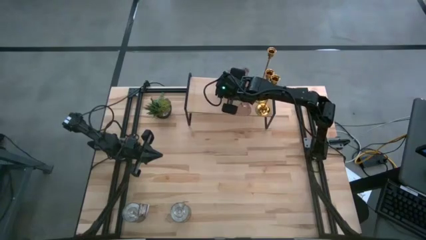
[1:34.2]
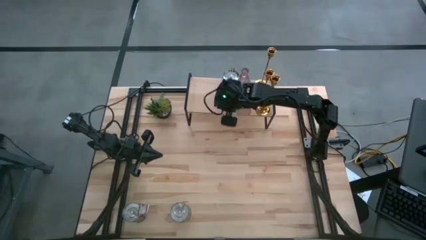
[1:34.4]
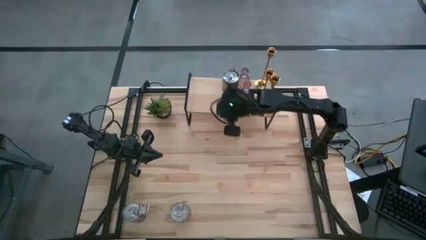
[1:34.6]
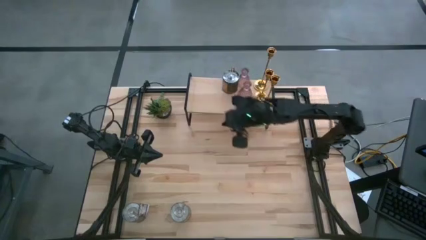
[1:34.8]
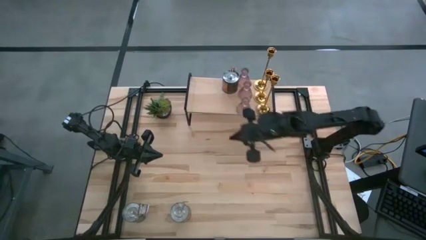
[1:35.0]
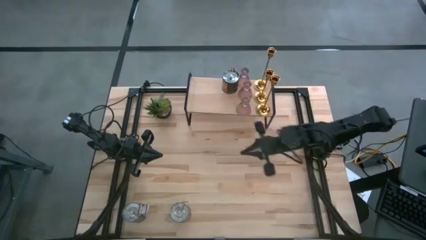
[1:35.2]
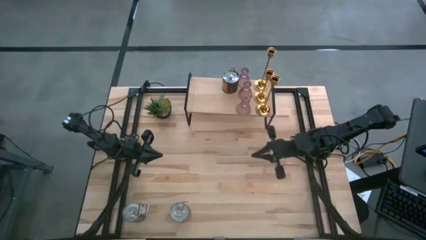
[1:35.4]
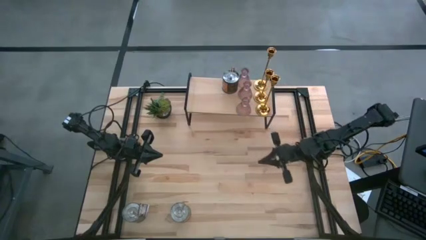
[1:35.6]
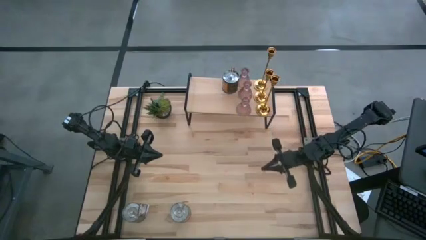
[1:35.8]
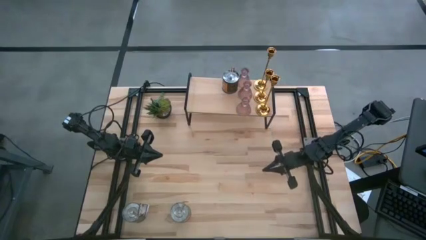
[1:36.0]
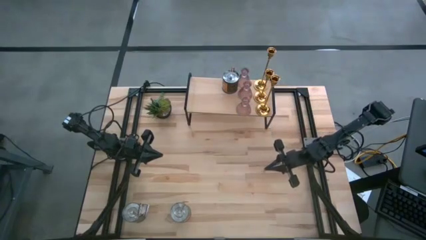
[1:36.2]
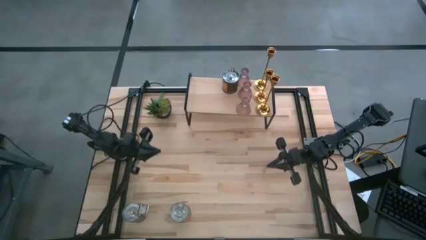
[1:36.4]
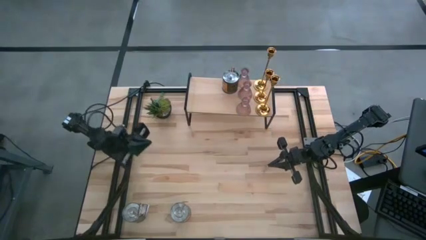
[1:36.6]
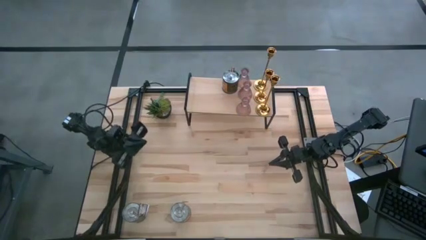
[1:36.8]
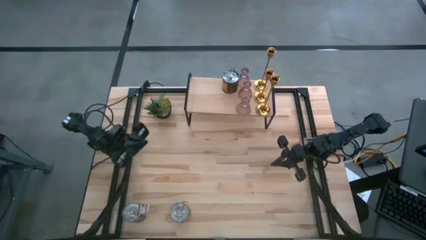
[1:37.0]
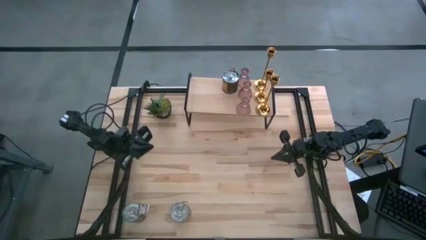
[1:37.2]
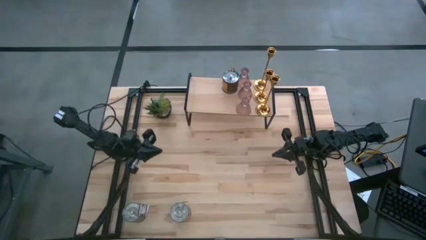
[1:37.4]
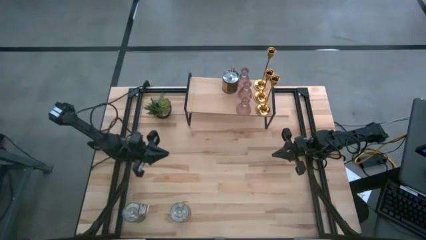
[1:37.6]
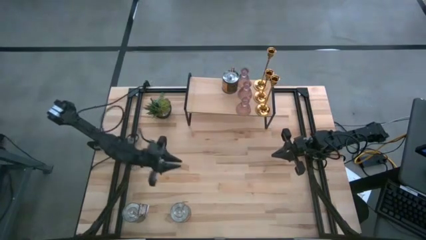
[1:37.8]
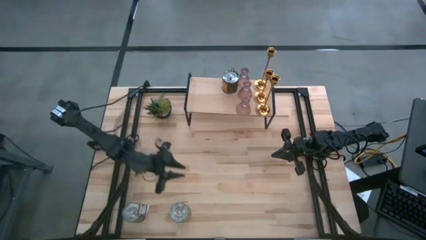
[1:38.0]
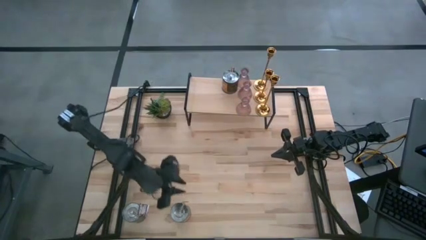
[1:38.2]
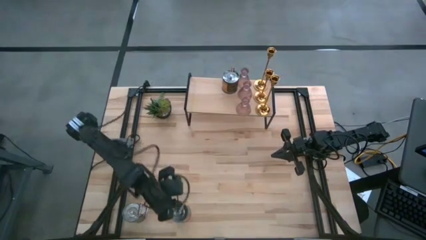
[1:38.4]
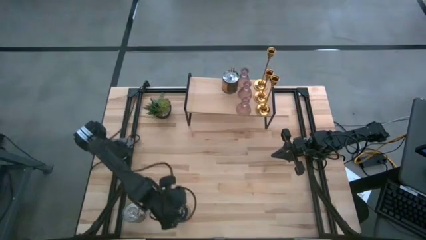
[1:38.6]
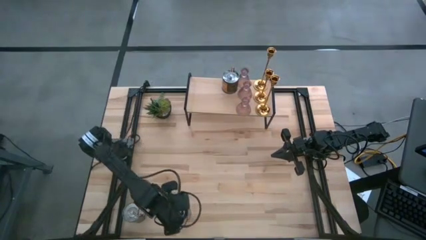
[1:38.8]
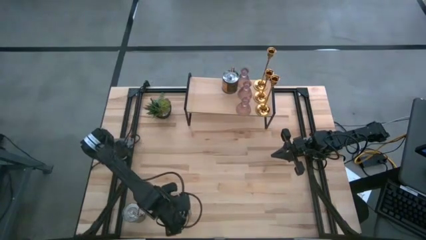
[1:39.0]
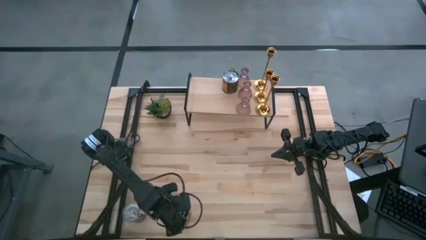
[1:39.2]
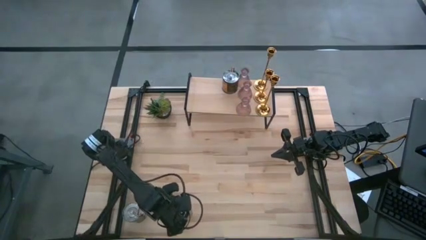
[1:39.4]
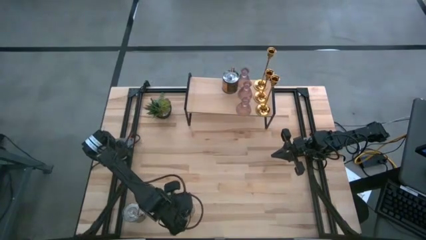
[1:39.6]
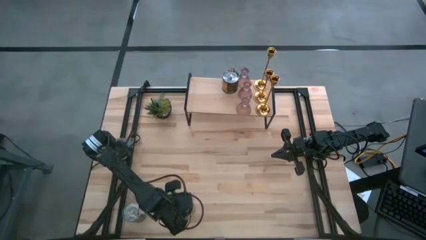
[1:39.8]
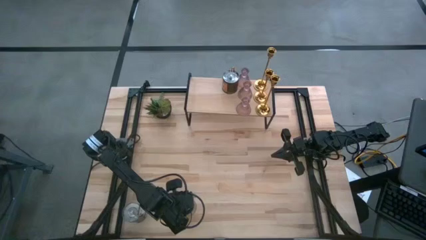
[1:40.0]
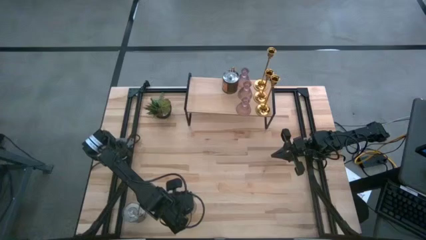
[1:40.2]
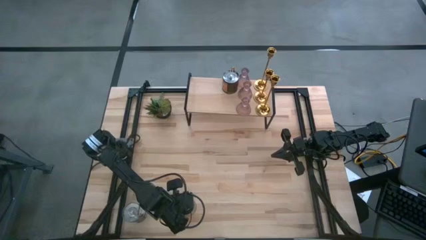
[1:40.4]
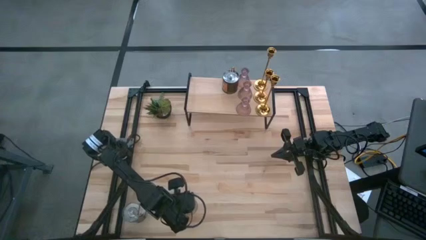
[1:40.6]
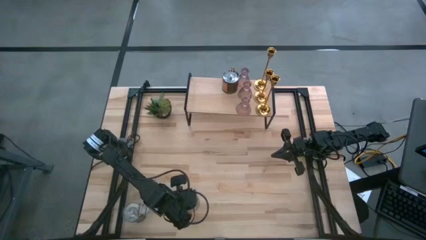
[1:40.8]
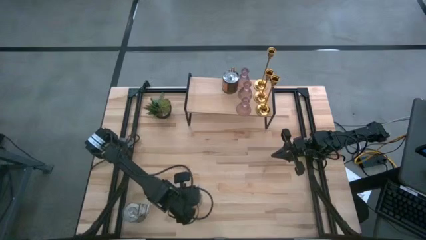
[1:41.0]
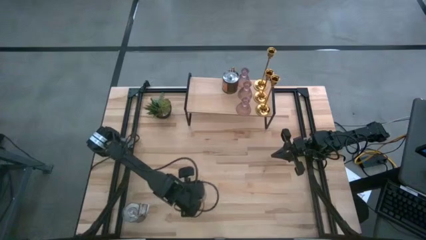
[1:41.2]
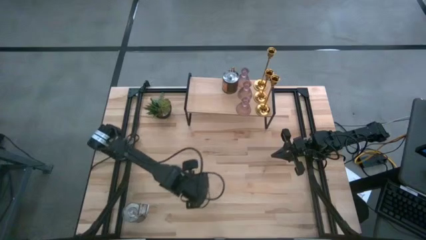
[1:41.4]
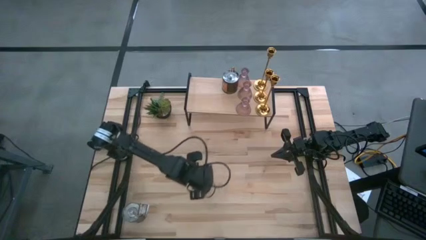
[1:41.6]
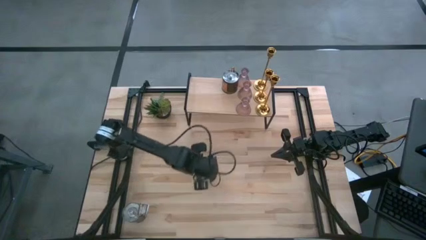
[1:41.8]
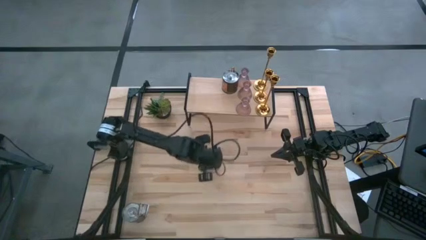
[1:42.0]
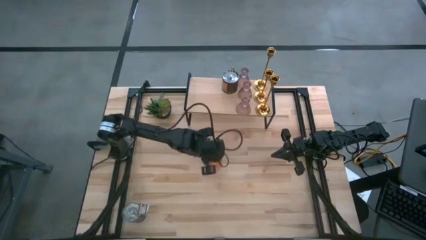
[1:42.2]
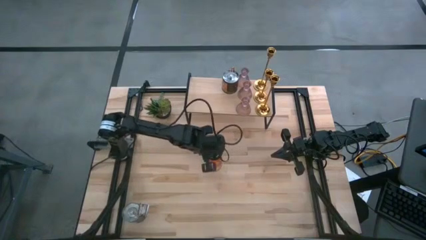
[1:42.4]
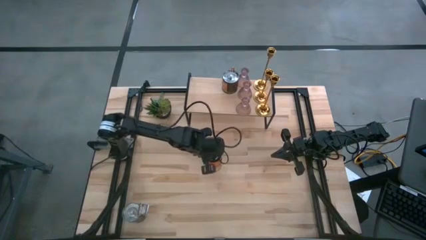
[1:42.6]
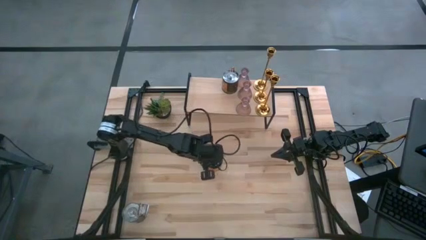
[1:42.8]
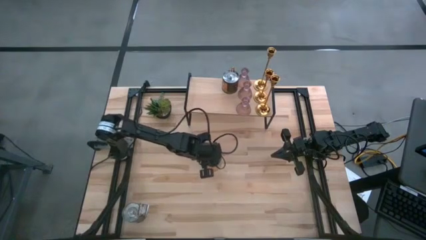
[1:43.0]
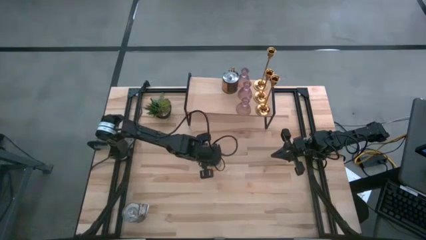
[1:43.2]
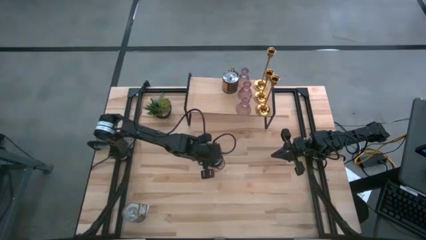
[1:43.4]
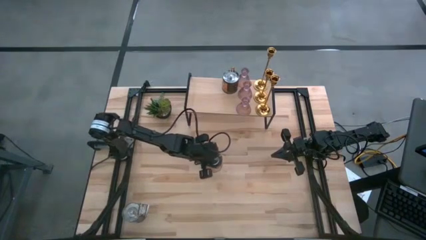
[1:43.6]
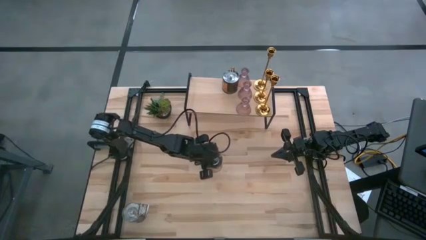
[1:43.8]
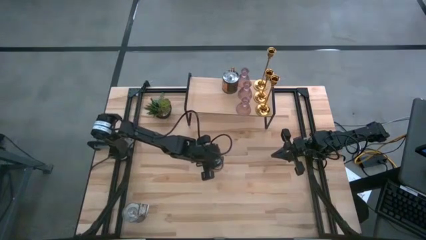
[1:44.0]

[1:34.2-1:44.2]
Task: Pick & Place candle stick holders
Align the right silver scented candle on the shelf with the silver scented candle

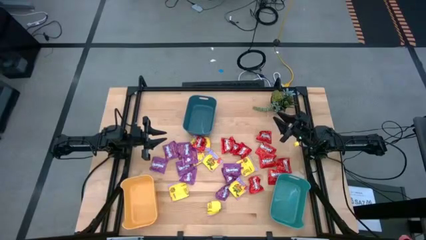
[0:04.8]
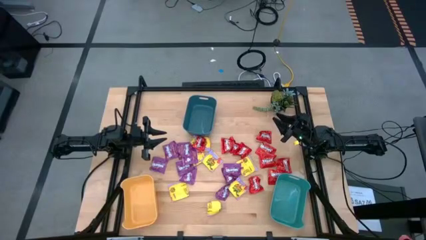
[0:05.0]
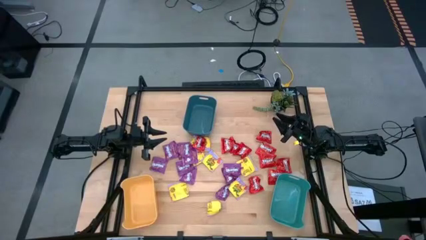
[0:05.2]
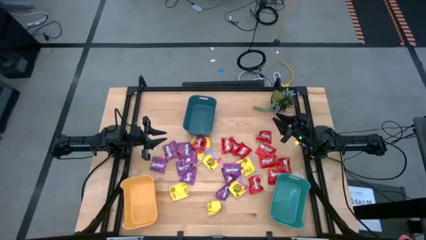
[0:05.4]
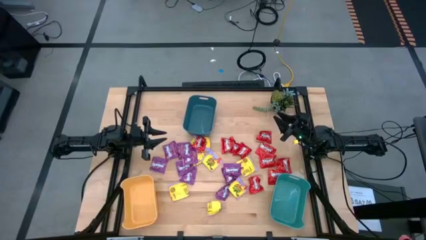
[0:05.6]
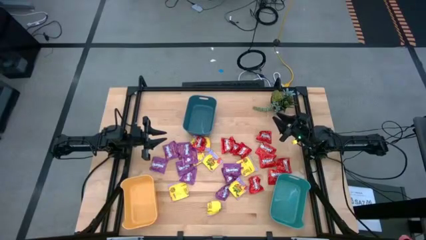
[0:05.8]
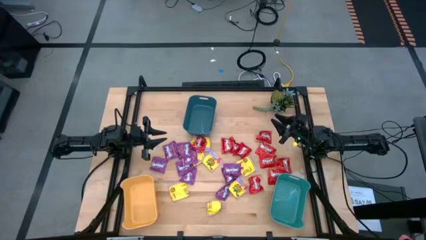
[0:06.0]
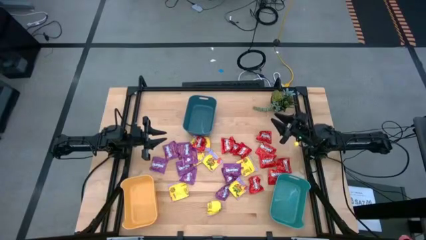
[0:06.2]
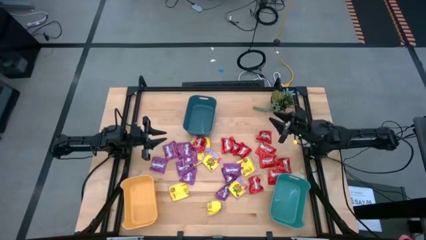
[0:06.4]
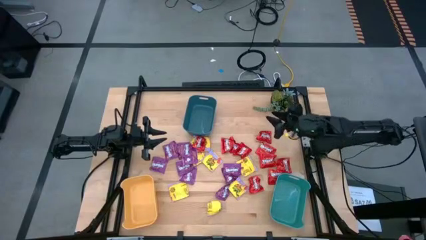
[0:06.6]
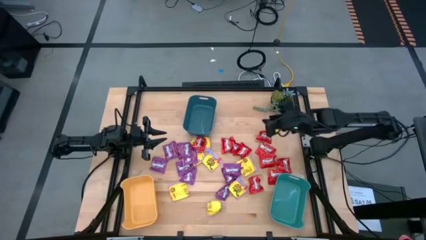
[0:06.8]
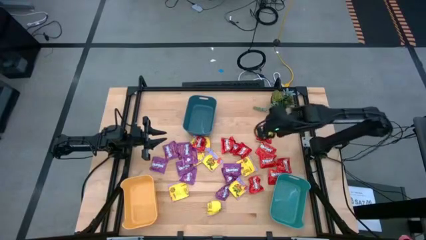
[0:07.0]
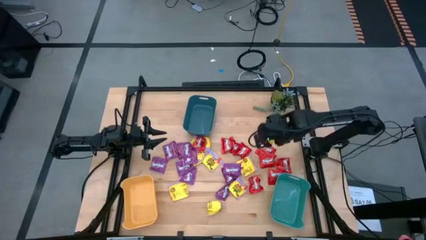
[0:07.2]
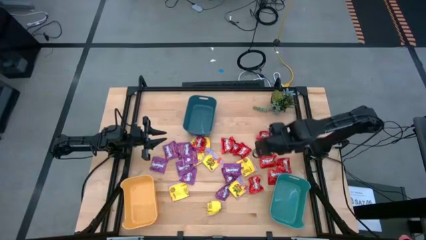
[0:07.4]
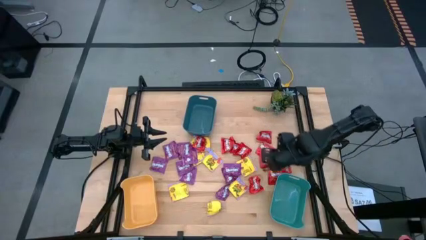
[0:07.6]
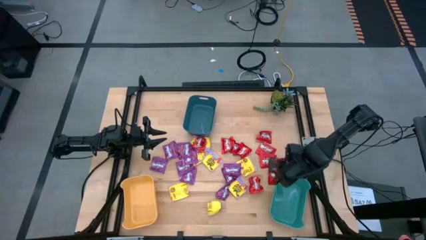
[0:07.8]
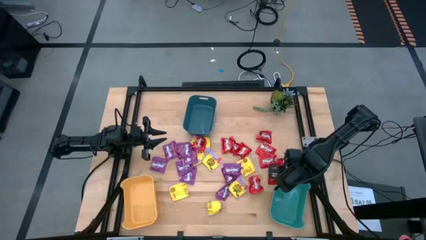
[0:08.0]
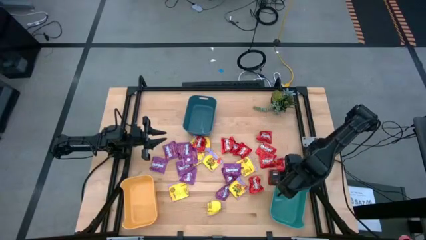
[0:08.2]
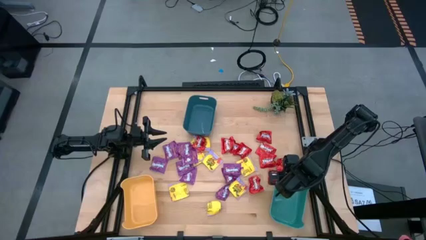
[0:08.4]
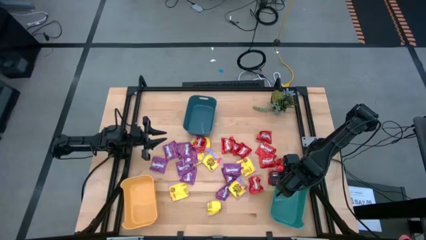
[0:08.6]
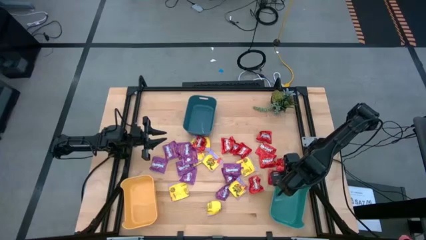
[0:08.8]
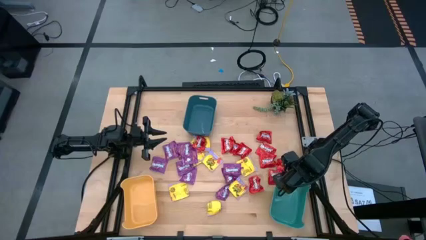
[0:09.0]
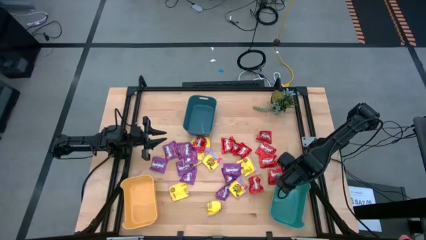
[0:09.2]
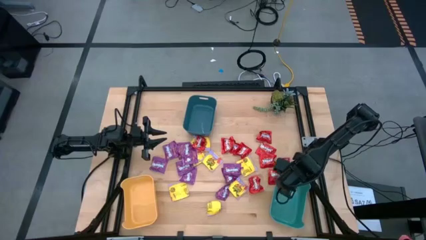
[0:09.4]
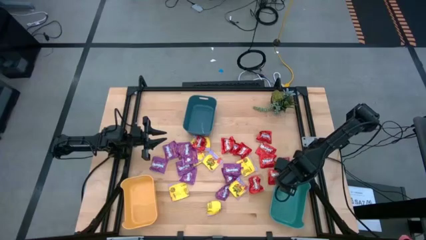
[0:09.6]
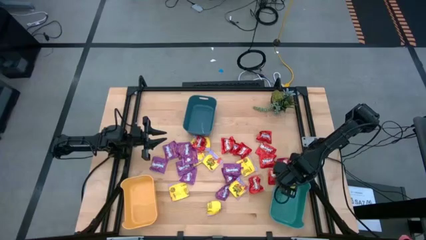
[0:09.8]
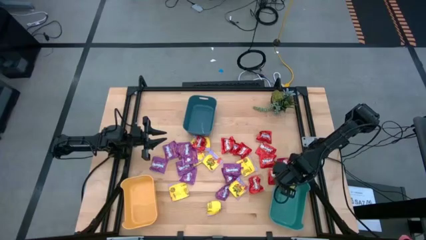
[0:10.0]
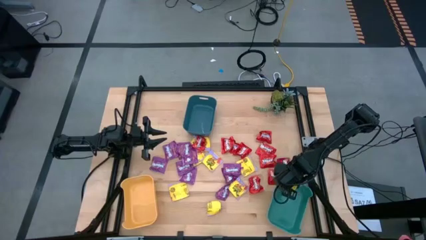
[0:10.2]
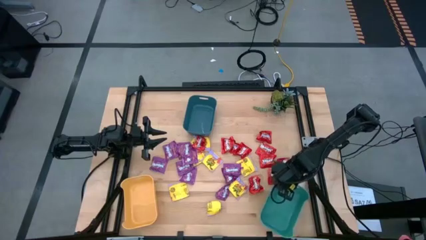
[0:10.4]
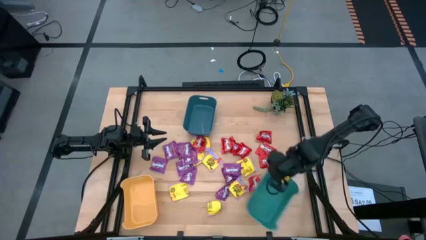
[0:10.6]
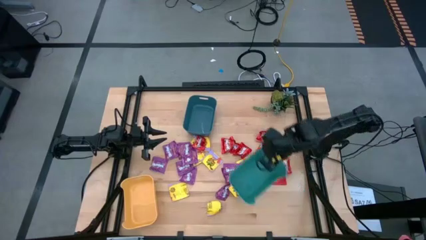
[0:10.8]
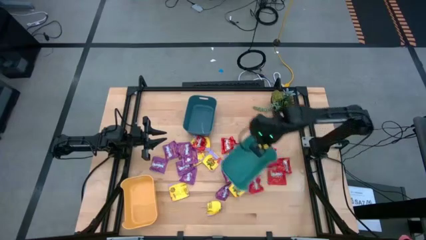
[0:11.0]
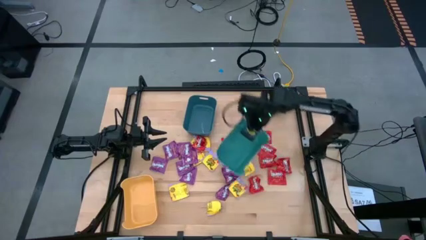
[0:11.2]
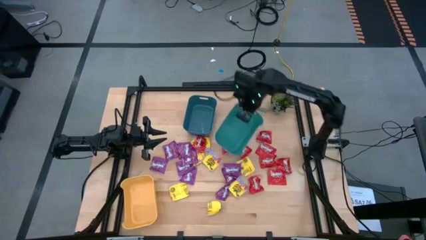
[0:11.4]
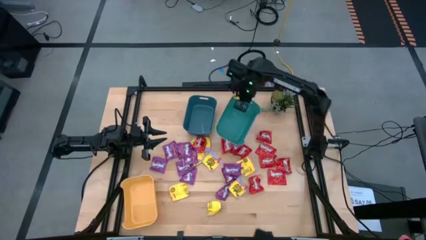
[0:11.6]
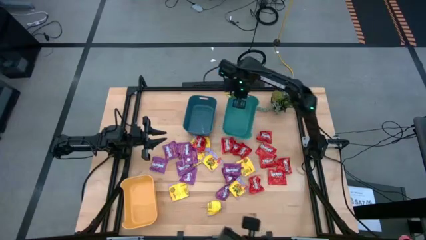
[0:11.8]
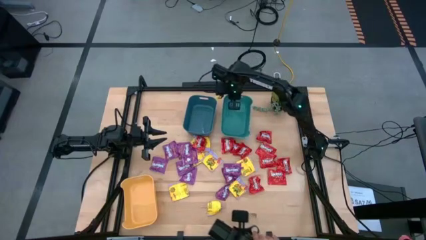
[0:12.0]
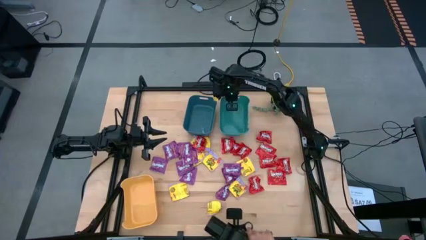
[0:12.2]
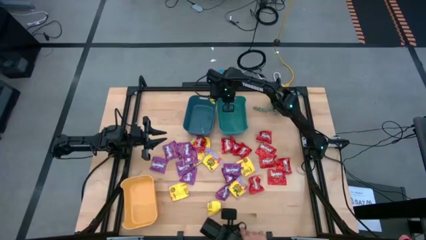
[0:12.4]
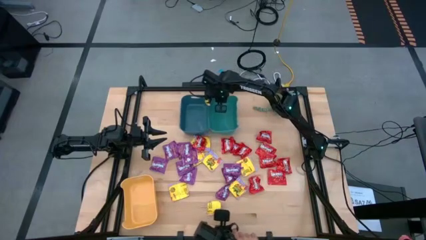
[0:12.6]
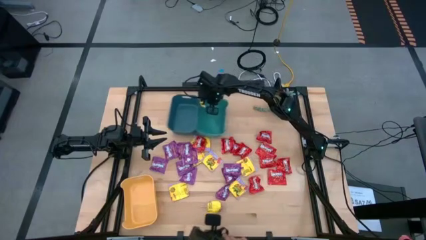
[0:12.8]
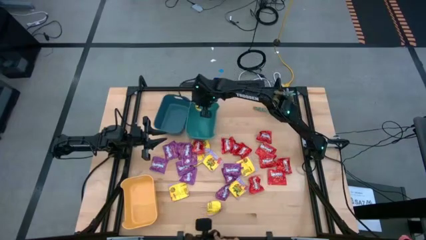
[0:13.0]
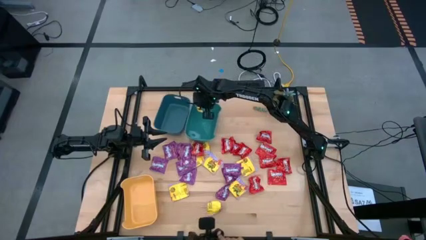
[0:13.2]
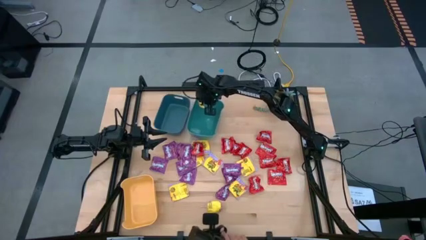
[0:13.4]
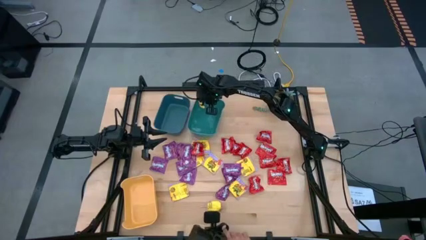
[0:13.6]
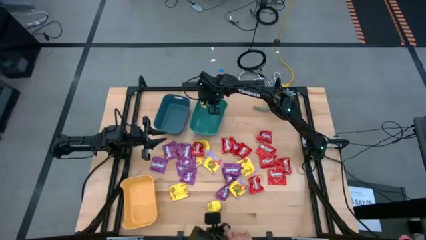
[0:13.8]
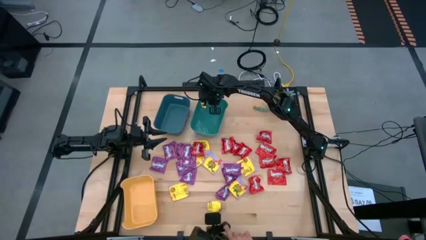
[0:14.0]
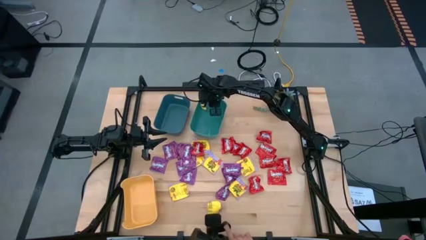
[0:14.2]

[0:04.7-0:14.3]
Task: Sort candy
Move the green bin to the top center of the table
